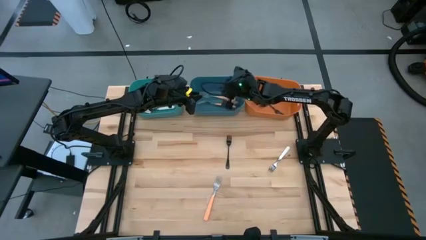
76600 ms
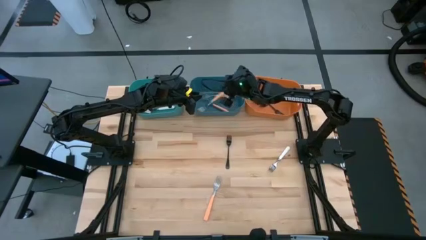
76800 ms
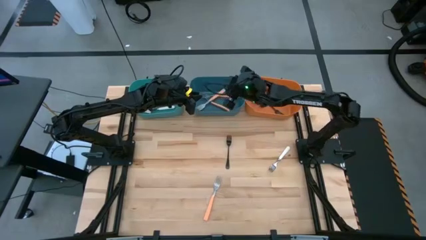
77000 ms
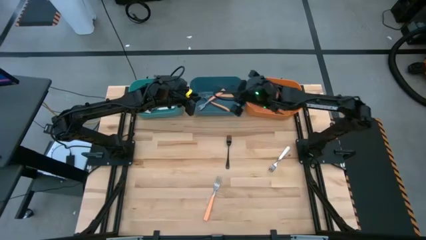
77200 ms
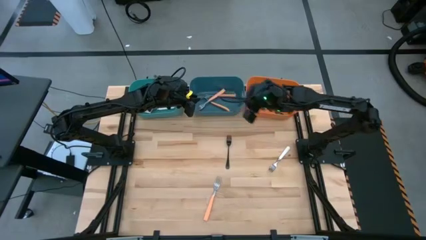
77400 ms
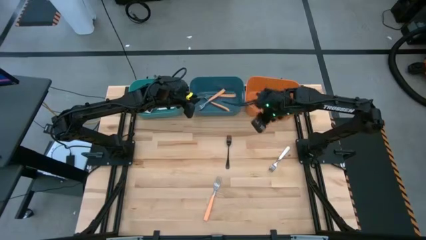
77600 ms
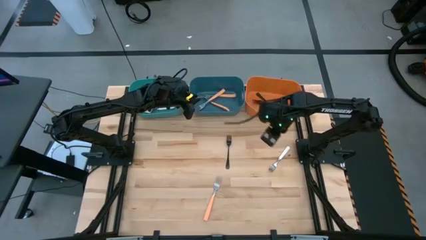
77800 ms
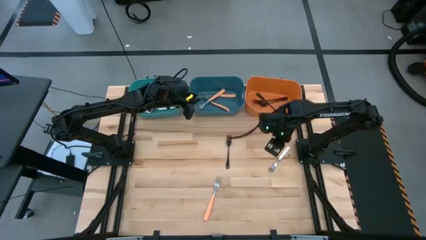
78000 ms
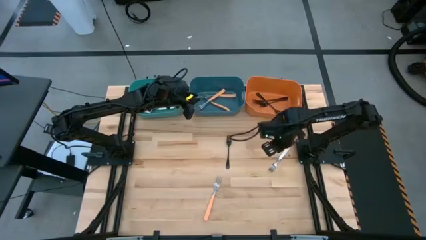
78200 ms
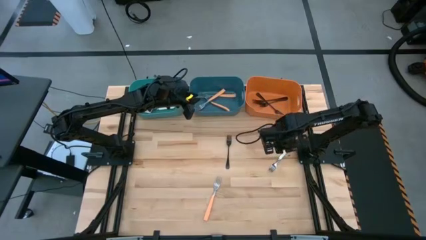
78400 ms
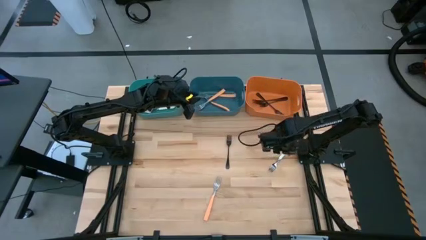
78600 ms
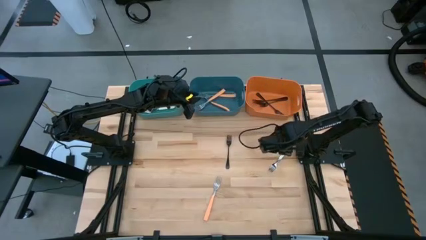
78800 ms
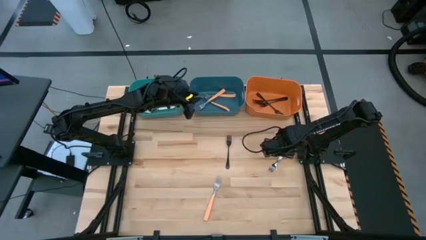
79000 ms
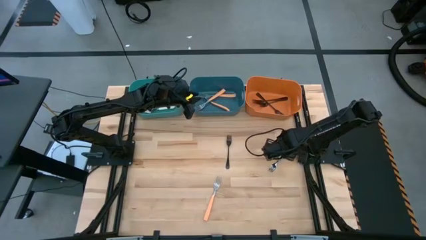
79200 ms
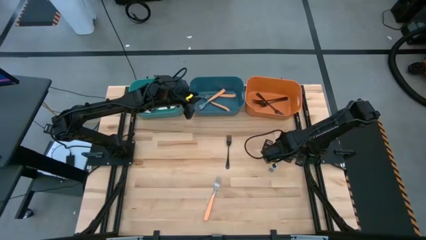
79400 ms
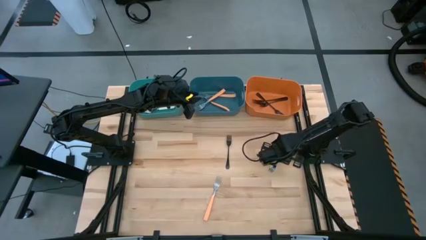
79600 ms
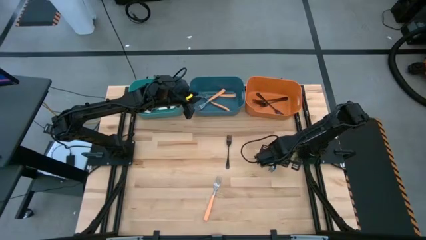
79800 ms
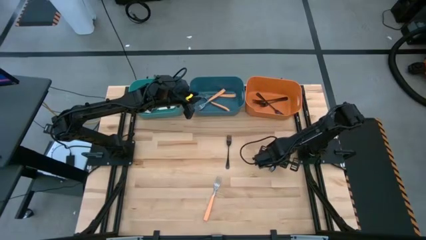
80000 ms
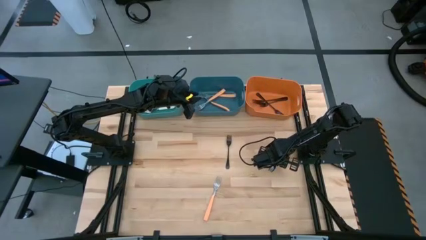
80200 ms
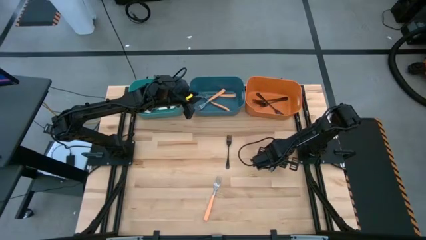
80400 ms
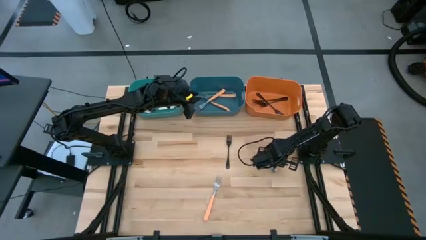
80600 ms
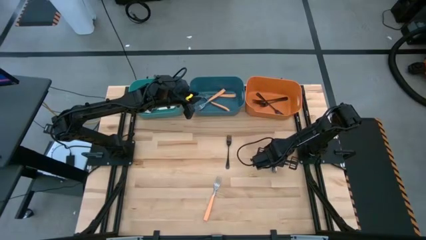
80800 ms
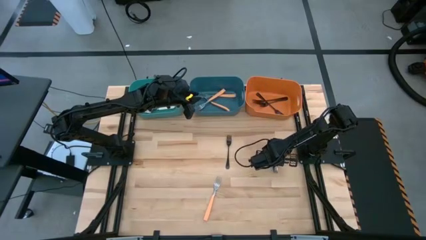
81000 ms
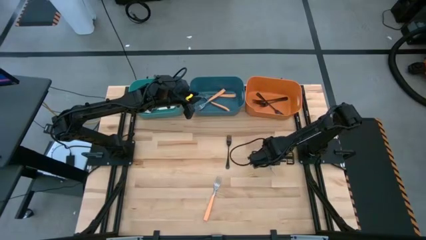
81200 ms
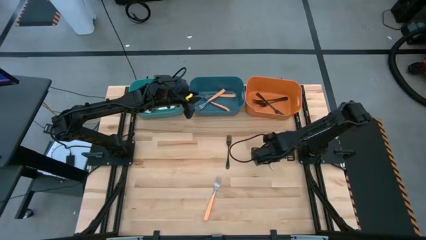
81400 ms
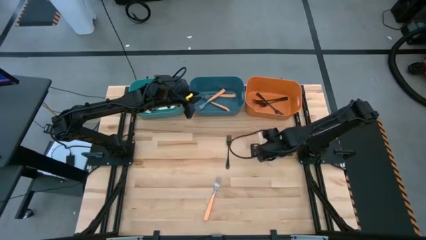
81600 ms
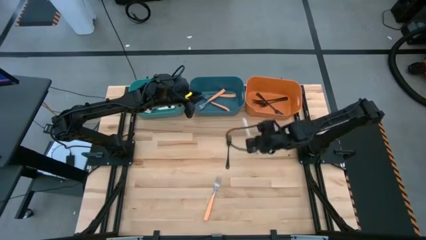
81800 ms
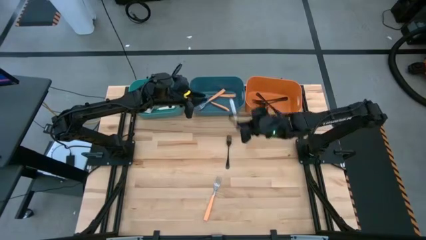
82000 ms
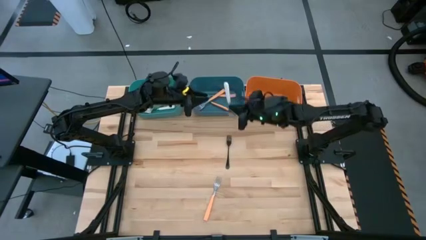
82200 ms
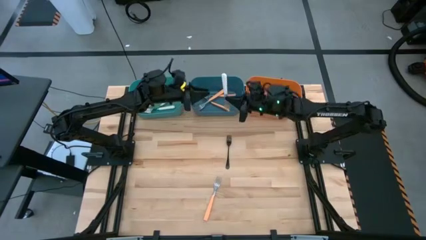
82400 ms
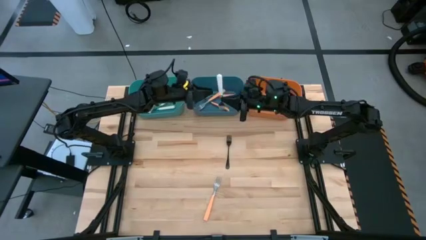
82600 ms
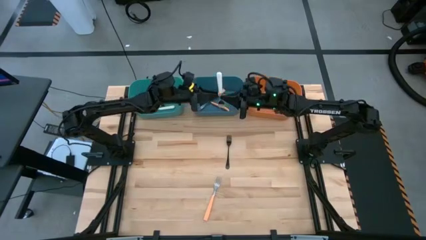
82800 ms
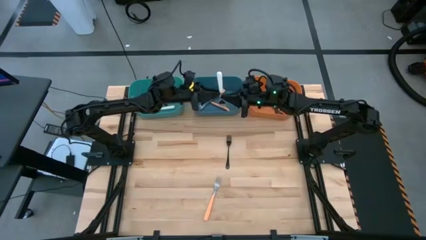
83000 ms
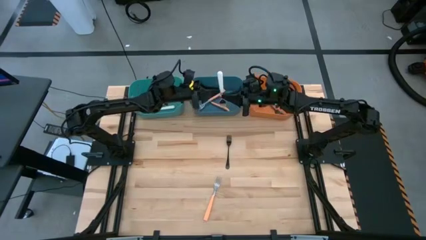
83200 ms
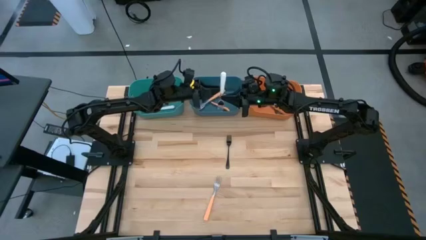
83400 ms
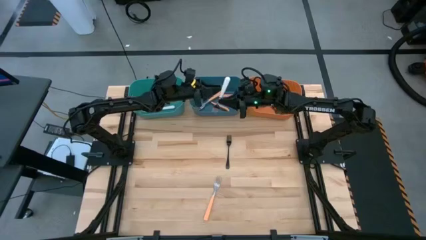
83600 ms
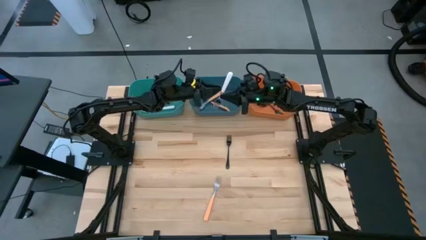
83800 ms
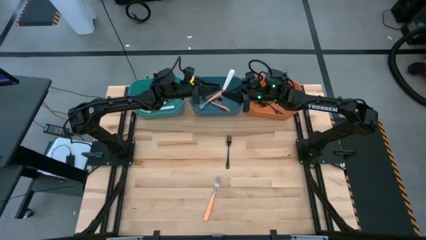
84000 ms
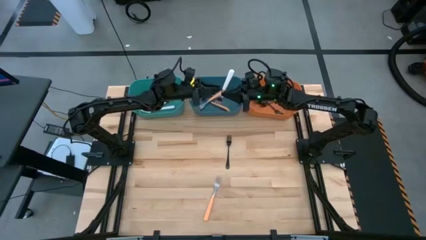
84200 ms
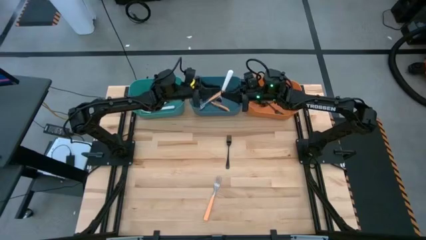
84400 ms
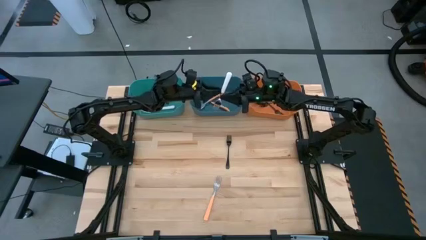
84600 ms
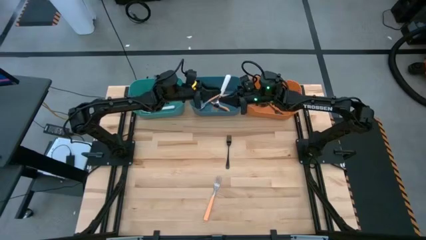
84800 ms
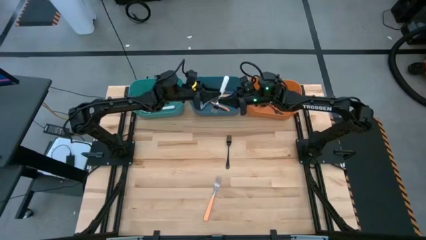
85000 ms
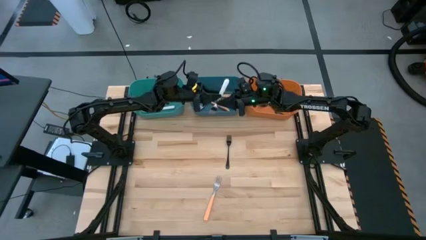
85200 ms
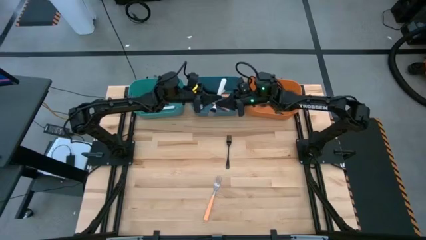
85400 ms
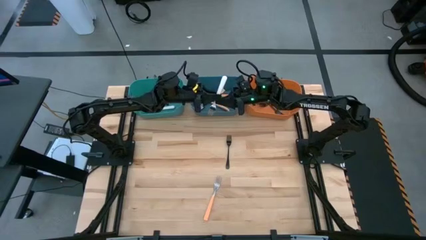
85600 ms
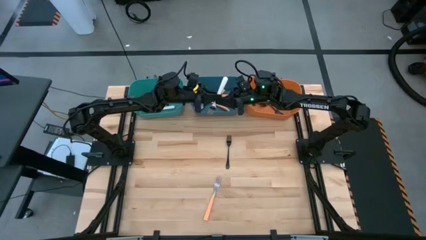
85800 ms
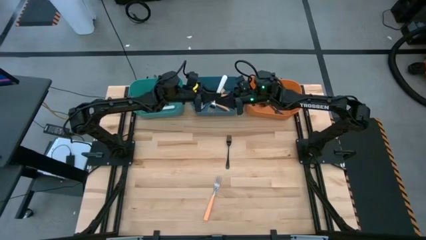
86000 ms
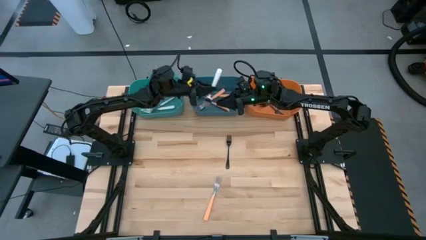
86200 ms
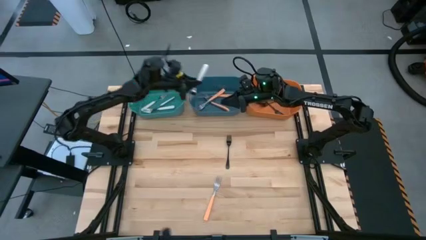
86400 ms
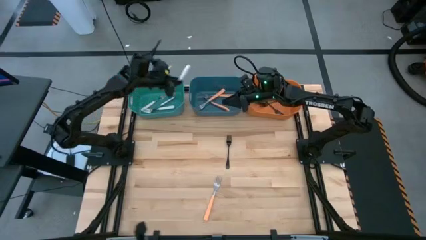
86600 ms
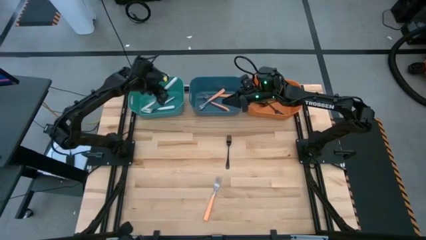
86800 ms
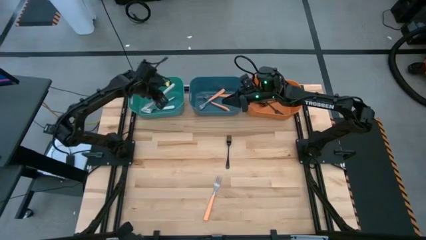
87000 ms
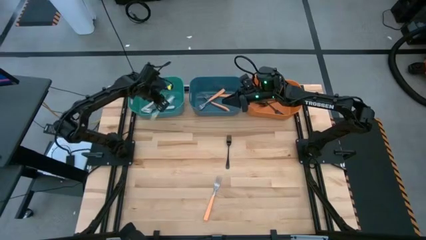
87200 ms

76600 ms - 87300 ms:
Task: Sort silverware by color (type)
Put the white fork into the light green bin

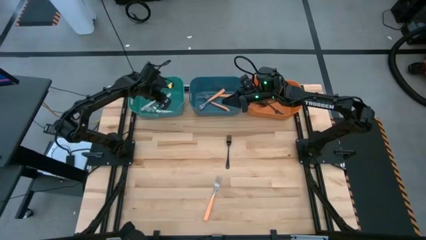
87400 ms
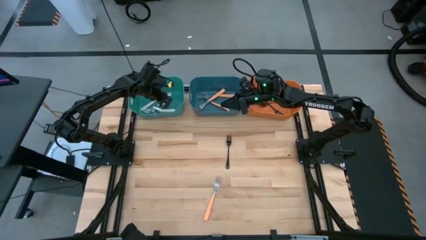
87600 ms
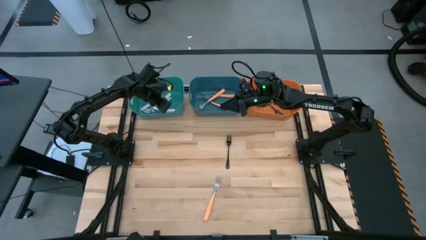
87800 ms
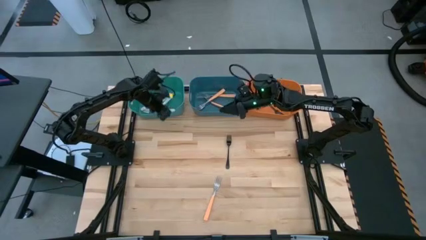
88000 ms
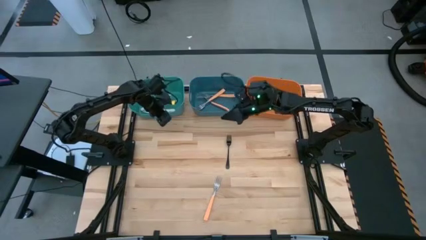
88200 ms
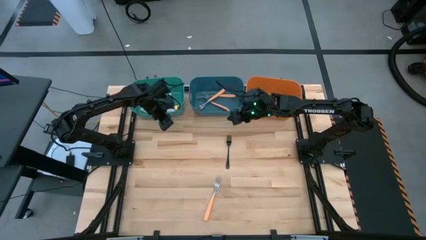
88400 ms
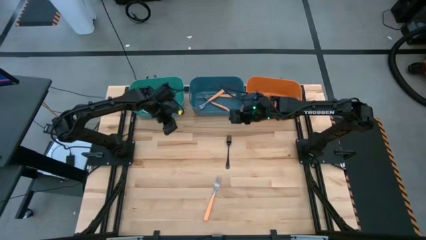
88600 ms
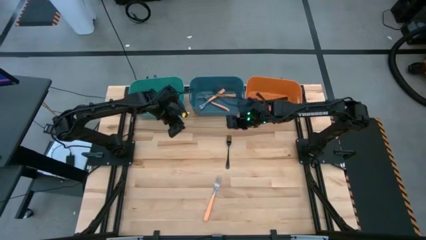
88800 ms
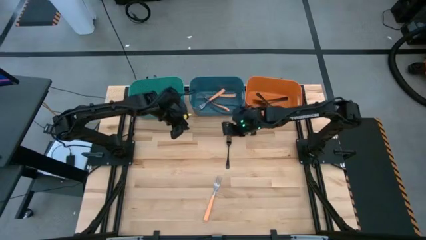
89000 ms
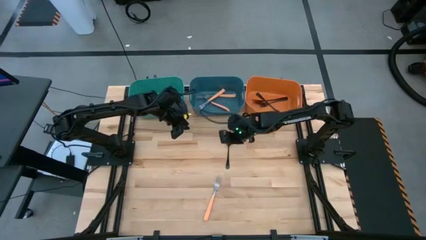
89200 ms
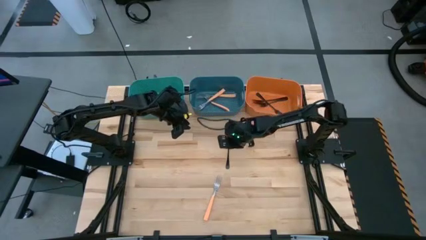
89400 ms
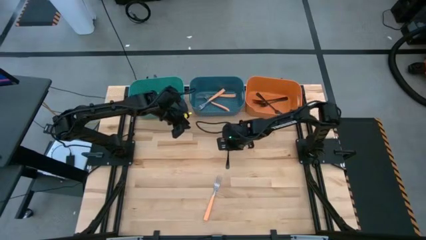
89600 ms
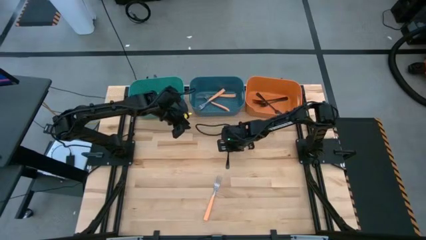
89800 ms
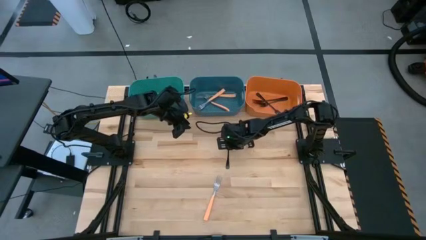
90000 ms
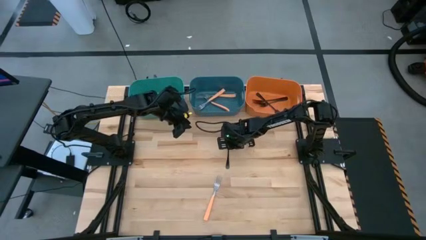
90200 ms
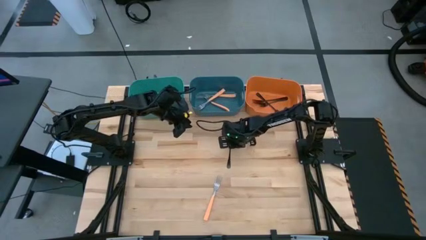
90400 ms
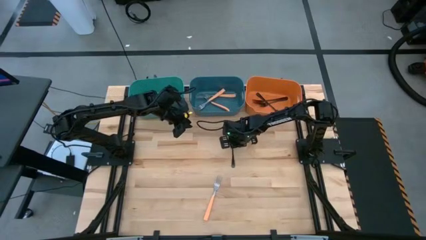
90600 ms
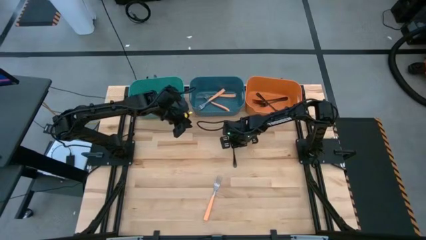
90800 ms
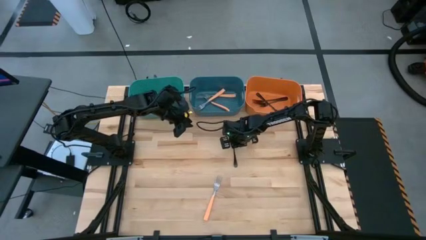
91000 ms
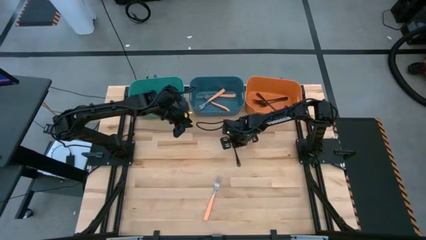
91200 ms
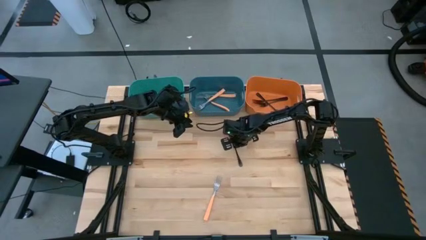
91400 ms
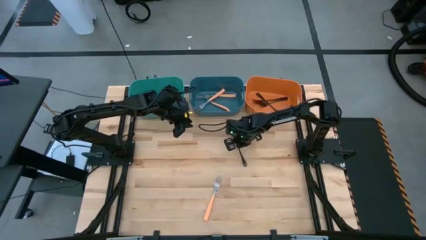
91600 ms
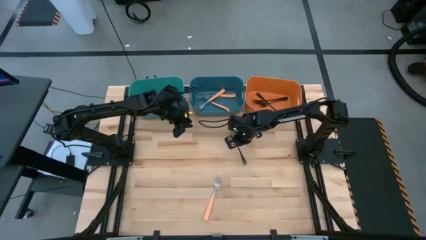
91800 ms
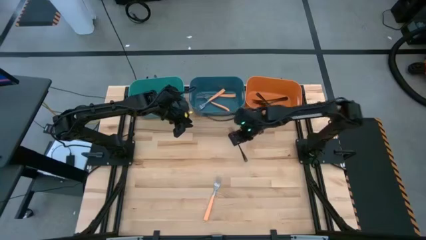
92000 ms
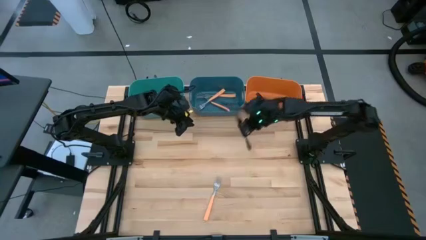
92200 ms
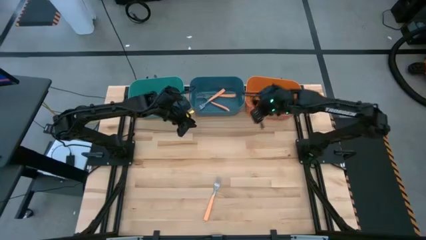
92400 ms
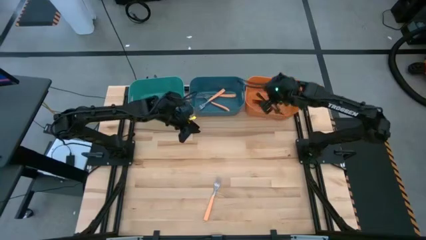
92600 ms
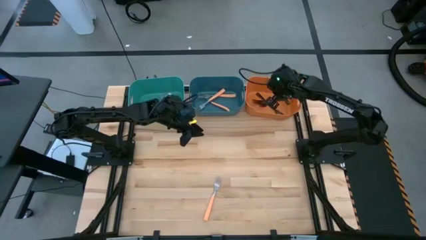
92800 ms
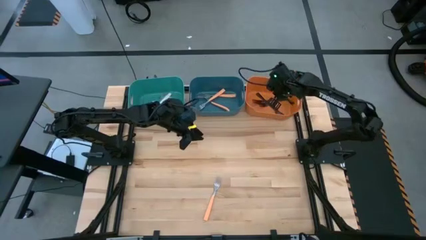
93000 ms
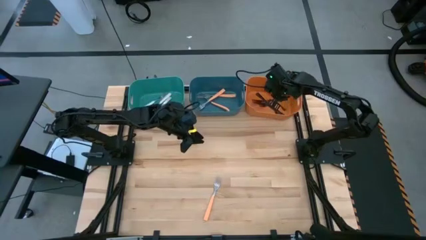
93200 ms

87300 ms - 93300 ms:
Put the black fork into the orange bin
